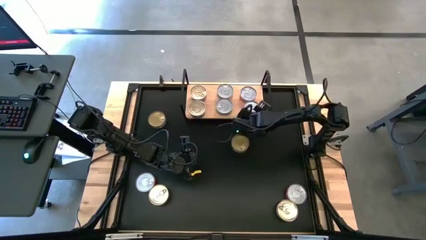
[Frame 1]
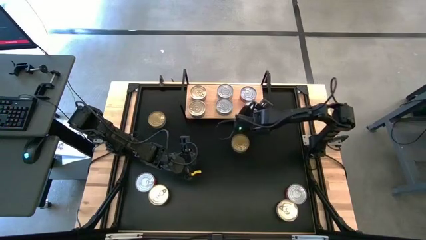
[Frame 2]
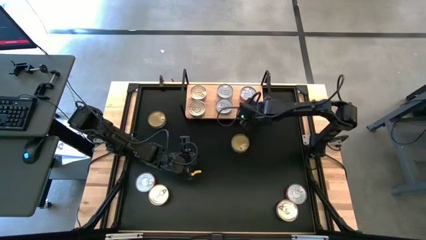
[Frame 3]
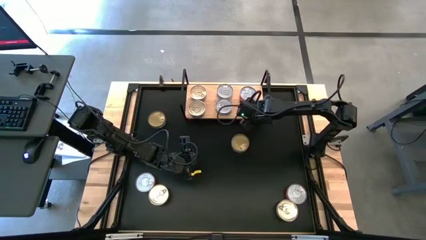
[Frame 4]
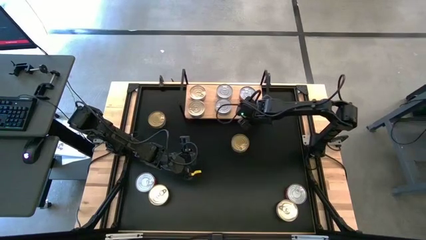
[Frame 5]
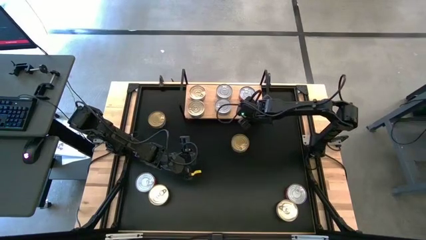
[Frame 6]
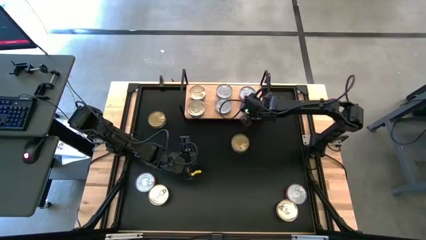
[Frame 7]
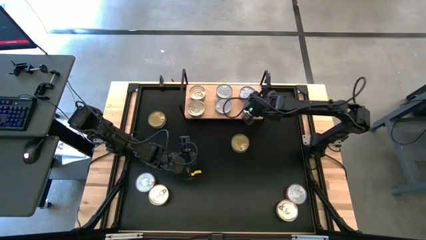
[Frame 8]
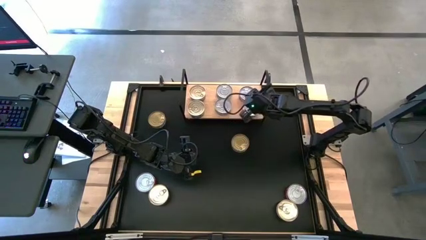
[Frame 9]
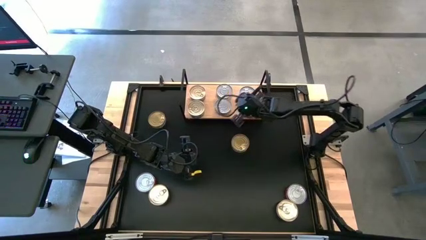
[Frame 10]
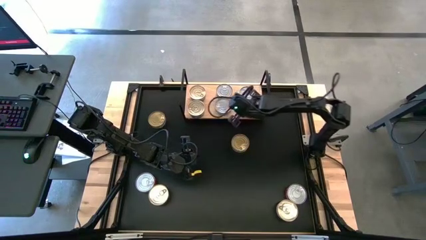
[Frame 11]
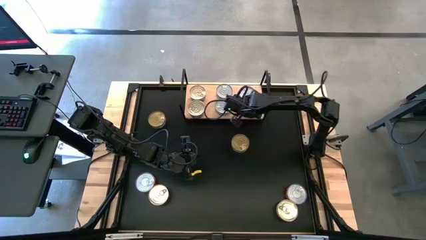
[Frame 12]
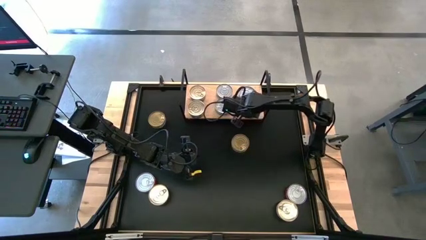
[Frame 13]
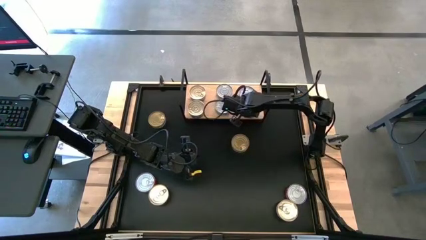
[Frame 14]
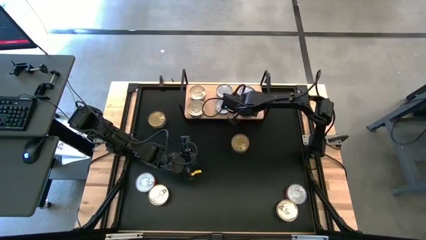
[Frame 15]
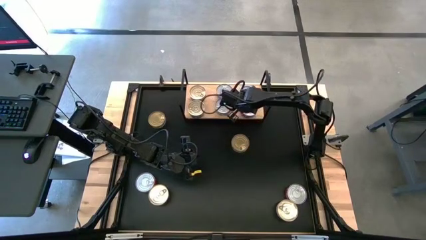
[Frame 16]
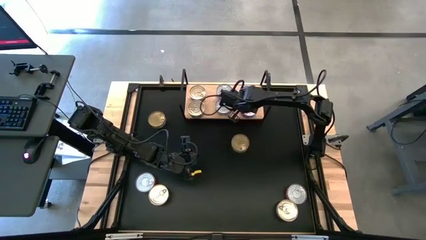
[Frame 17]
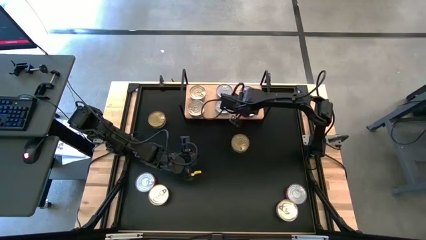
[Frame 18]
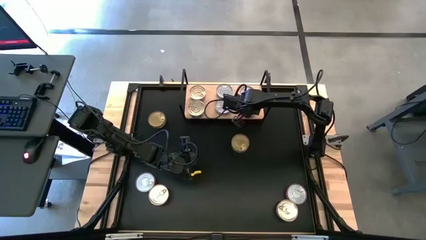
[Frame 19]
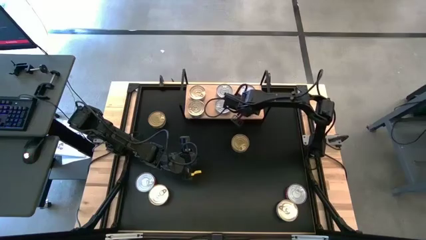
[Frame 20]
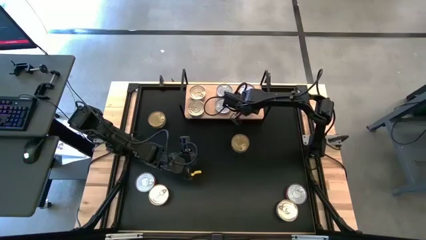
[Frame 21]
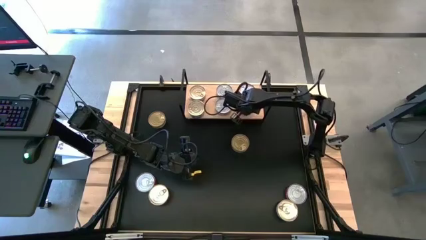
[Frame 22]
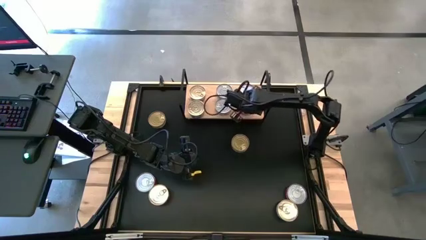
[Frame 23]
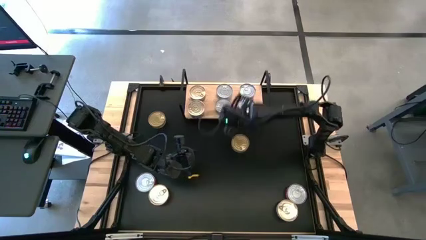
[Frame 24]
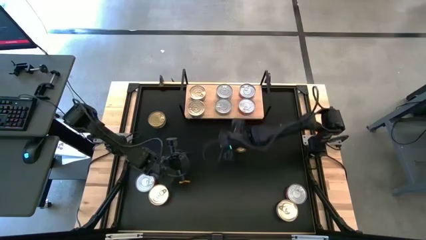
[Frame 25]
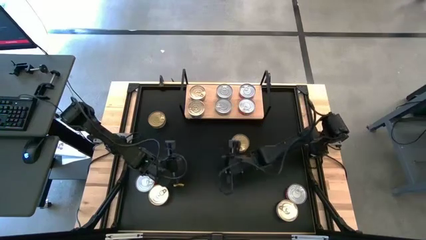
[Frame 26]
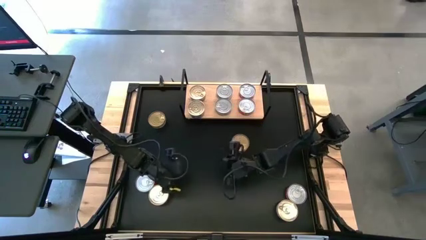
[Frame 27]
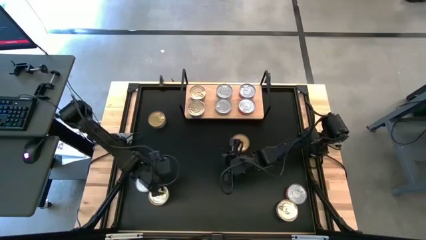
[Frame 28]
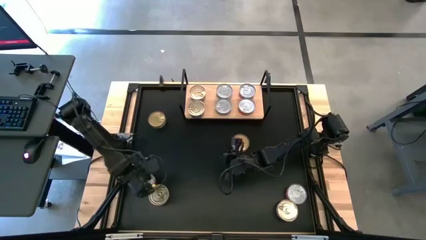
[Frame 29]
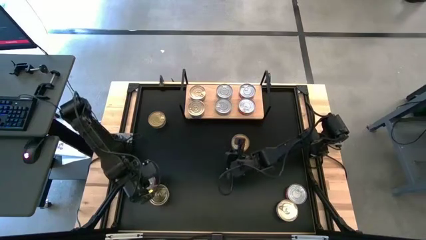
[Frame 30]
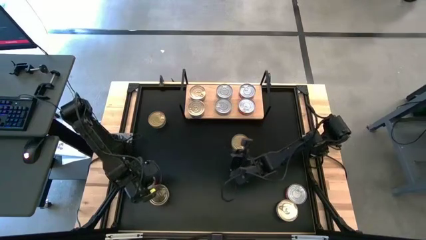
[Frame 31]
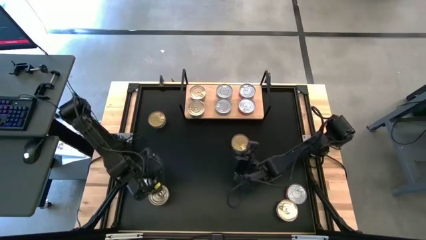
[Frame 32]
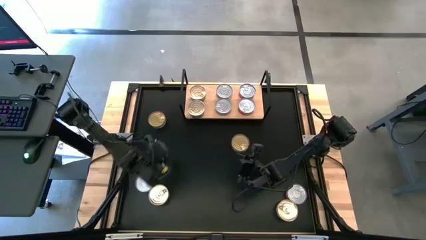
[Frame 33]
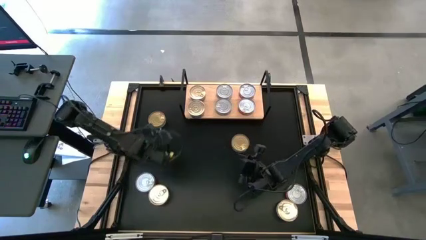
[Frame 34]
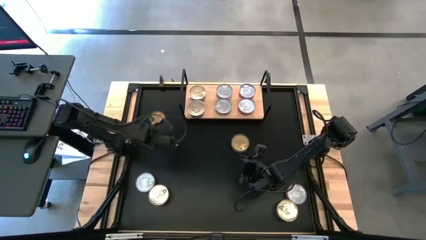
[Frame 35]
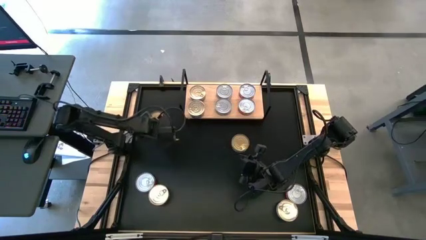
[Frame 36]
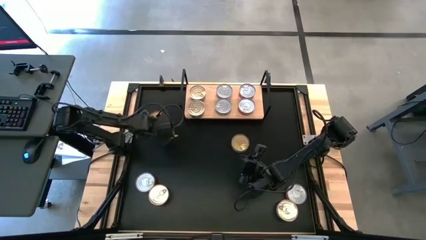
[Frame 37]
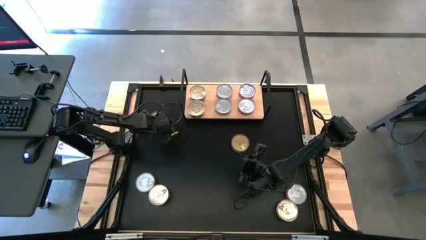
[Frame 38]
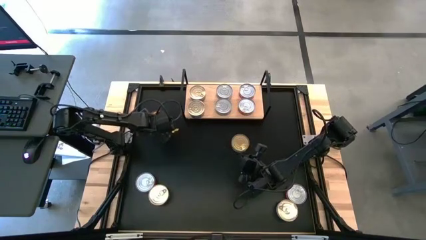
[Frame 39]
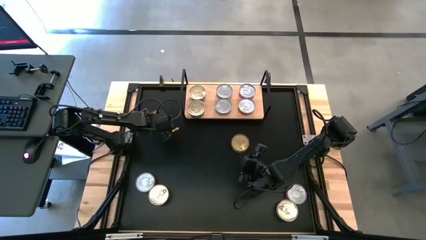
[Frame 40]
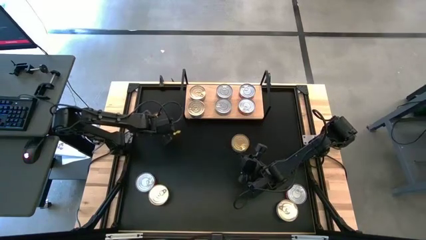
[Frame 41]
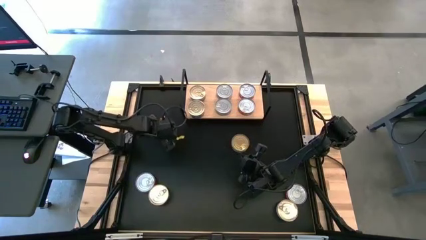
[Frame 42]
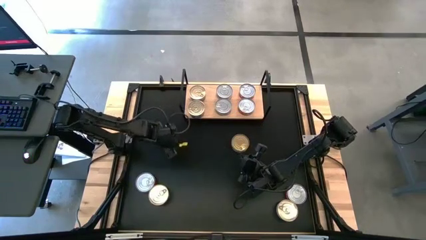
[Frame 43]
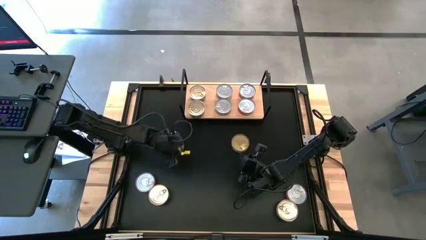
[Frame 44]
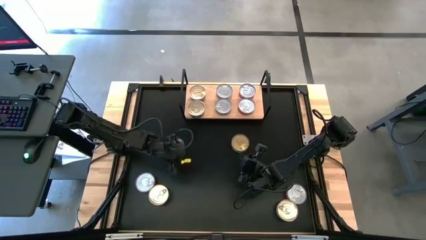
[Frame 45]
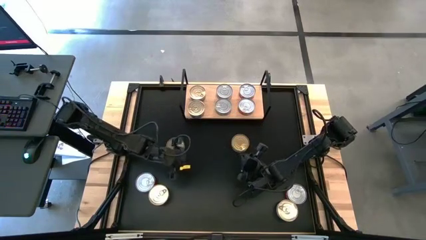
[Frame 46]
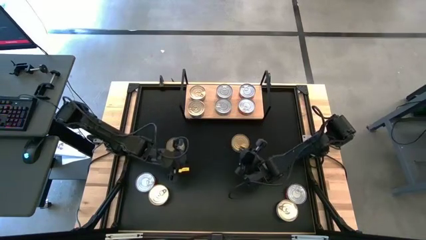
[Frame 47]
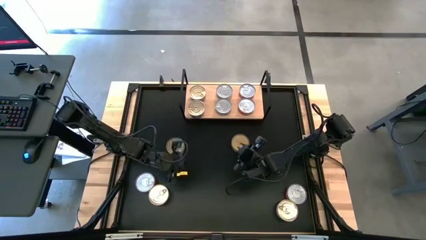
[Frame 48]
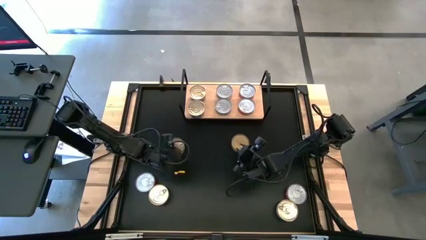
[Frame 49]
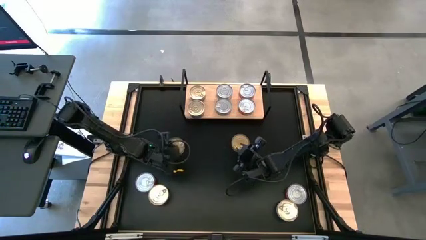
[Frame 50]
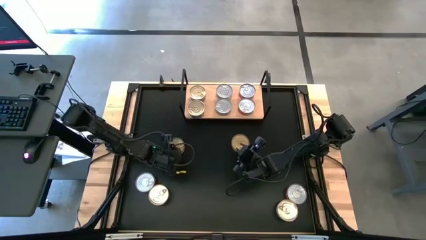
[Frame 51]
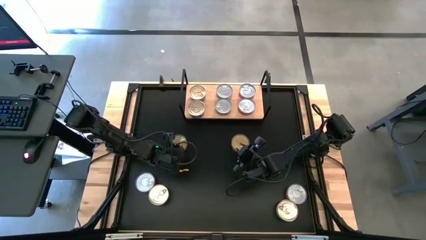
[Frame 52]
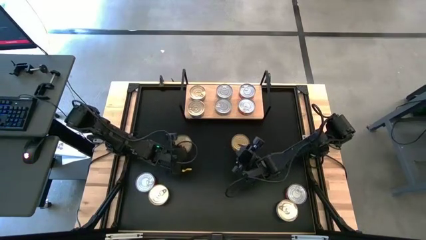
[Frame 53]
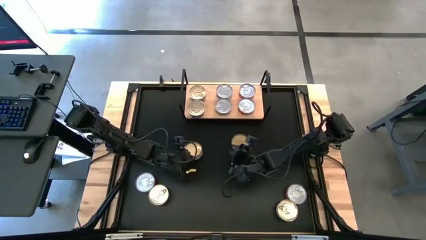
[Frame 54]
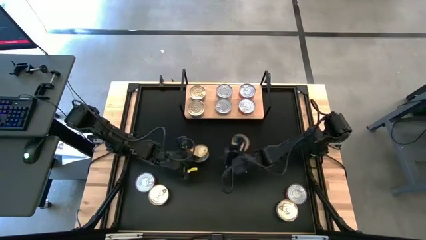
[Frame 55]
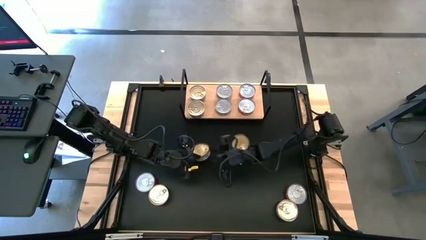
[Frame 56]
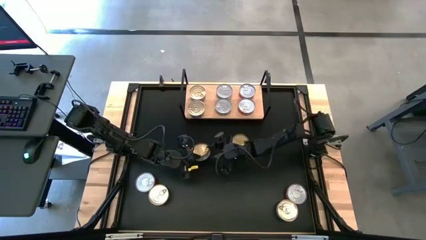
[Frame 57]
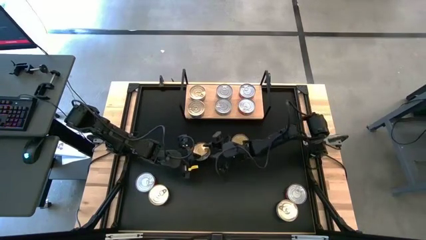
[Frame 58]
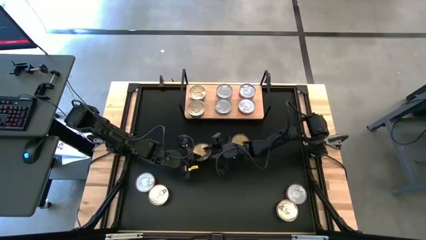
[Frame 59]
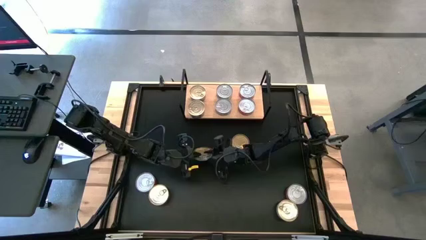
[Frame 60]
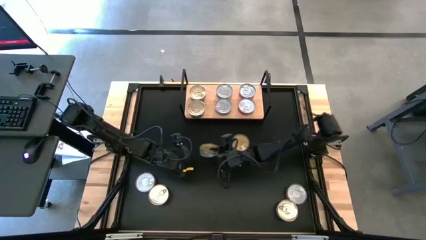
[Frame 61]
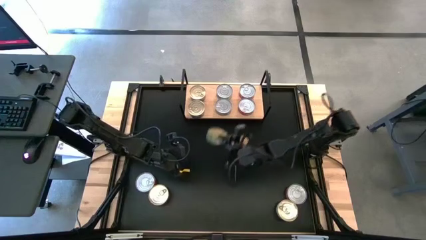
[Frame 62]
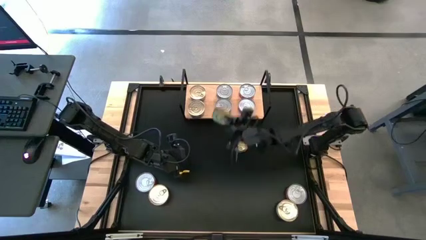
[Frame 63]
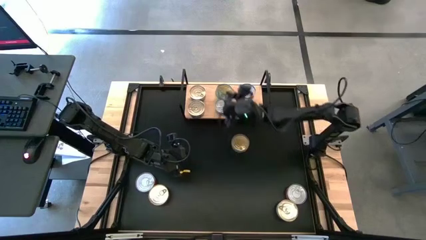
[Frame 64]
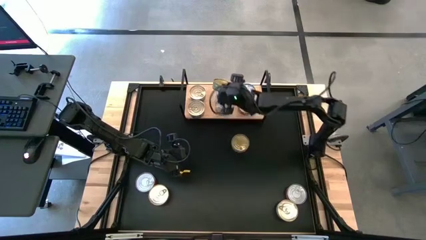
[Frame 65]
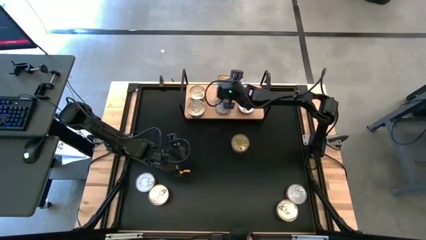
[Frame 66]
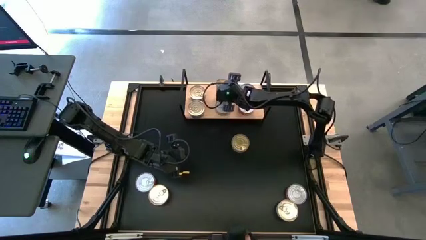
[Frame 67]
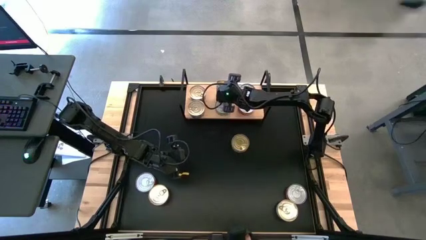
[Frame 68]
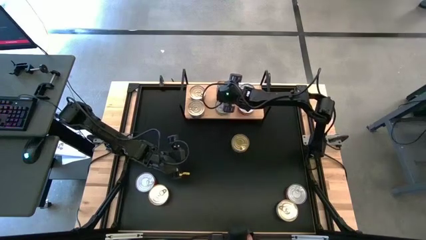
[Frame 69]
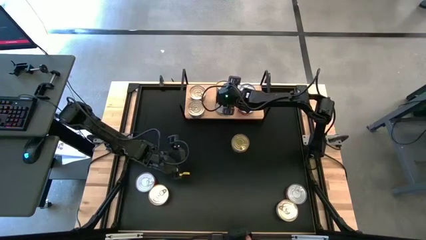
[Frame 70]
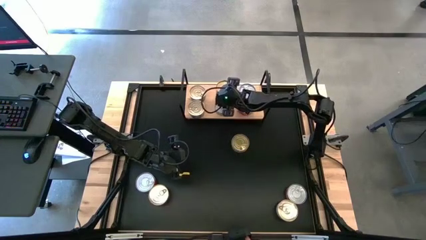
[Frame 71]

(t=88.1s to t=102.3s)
Task: Stack canned seafood by type on shelf
Stack the left green canned tuna on the upper center canned tuna

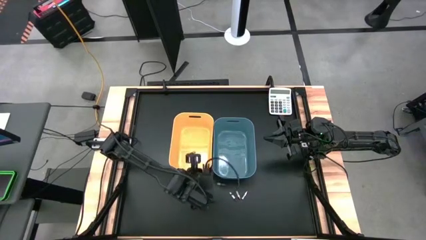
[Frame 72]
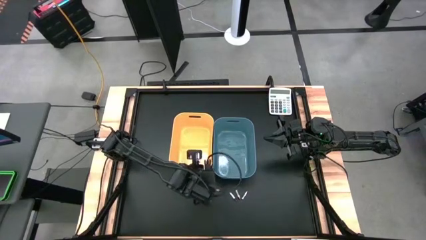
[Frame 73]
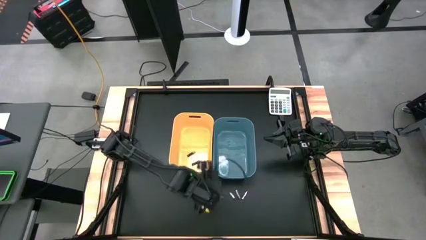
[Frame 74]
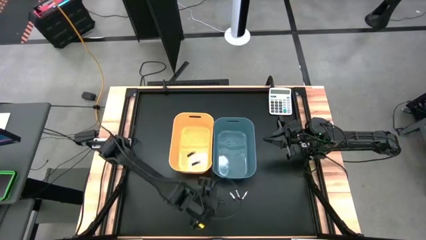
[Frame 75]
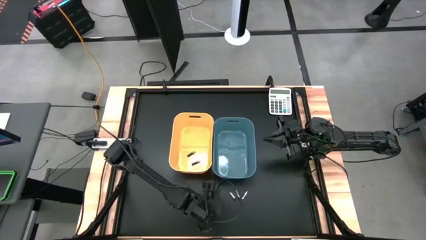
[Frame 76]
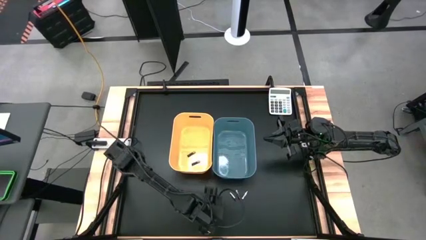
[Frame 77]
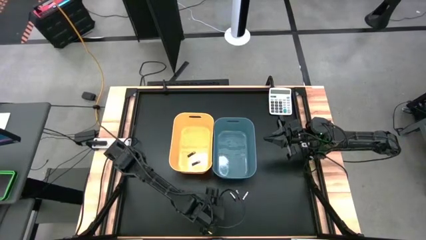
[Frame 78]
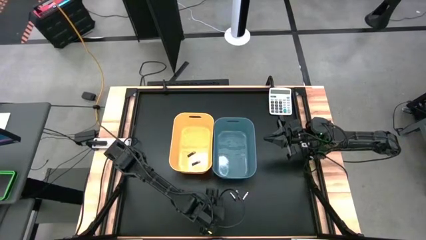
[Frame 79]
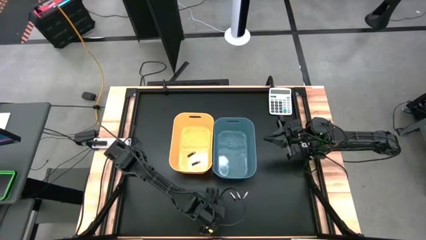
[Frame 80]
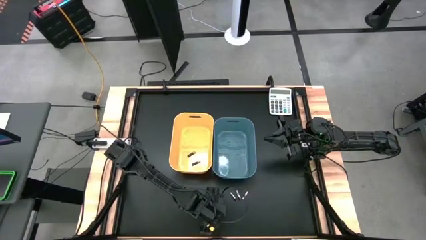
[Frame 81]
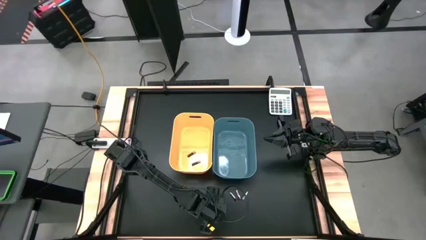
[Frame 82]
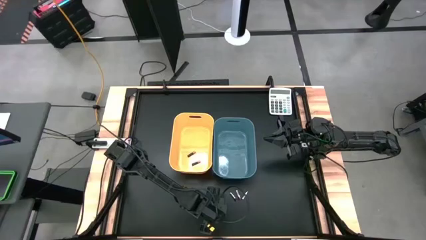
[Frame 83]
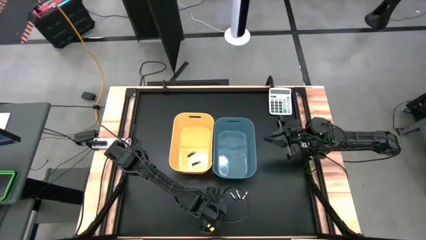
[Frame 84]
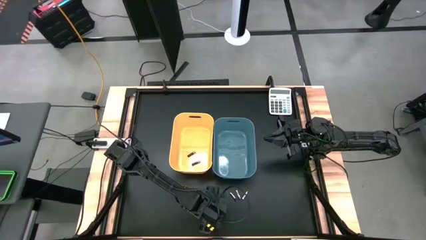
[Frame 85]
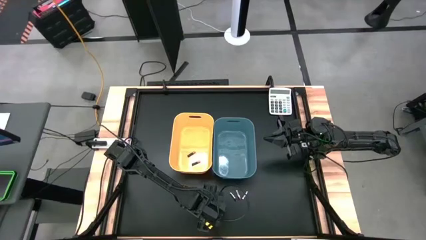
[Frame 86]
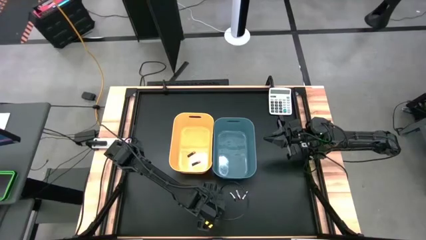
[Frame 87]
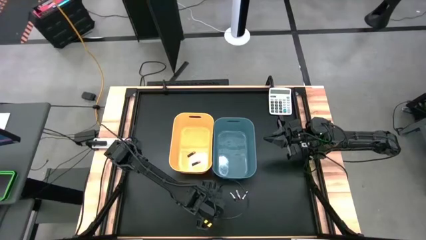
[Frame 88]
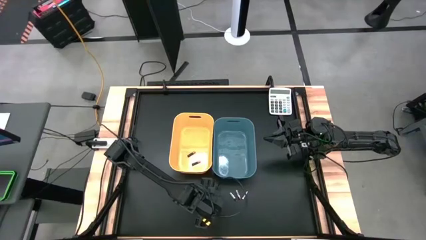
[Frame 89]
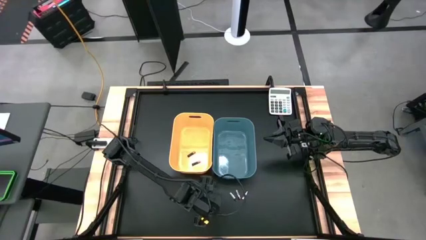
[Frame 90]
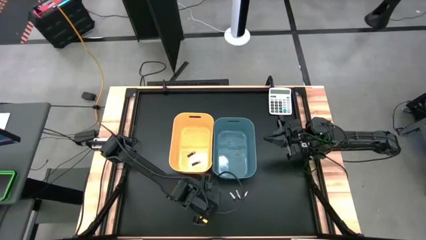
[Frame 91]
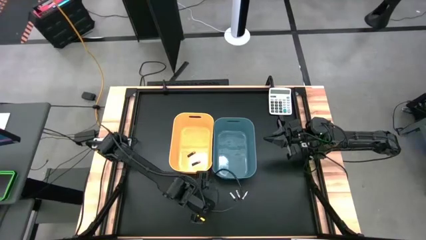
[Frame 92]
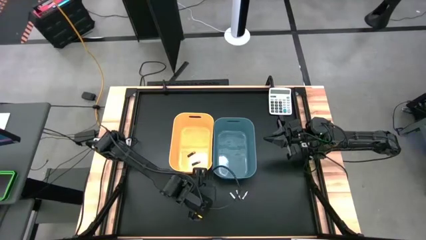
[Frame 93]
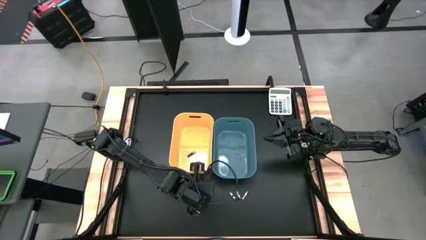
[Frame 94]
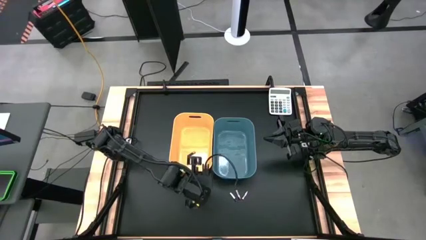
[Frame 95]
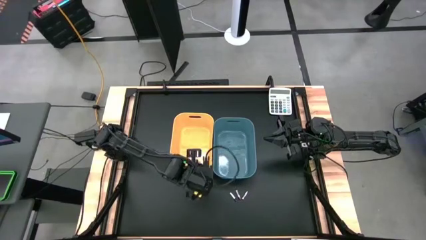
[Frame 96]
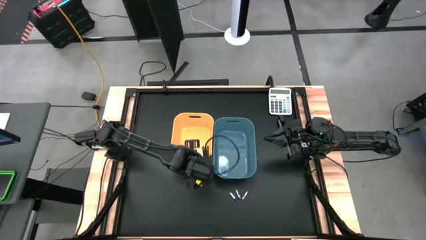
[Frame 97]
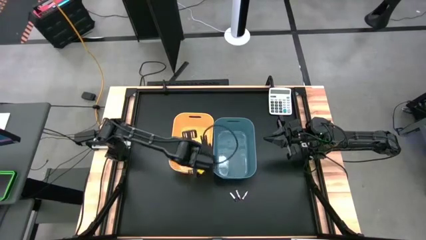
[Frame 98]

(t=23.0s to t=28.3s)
Task: Sort batteries
Put the black battery into the yellow bin
